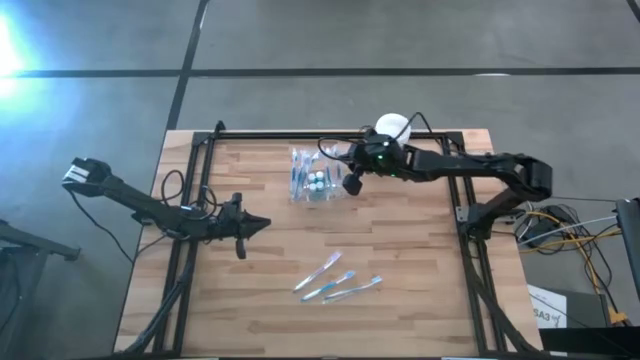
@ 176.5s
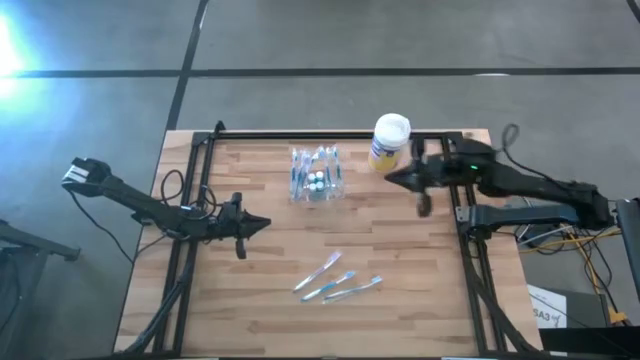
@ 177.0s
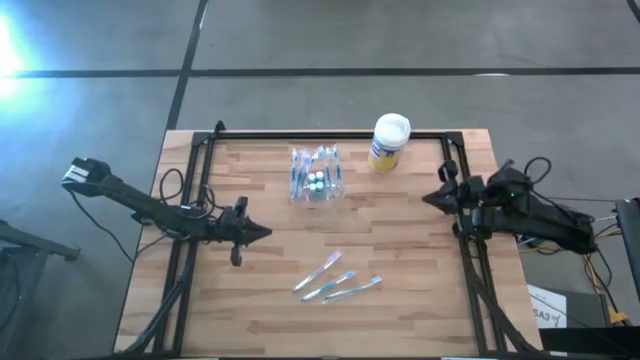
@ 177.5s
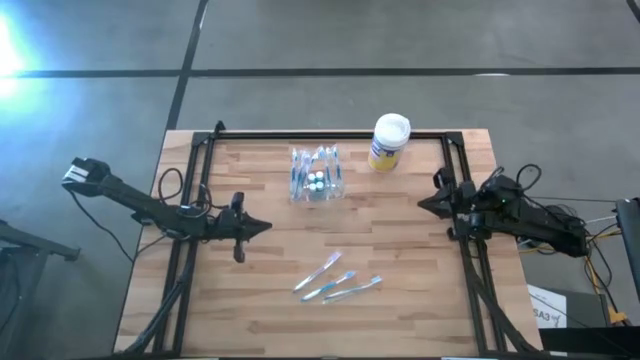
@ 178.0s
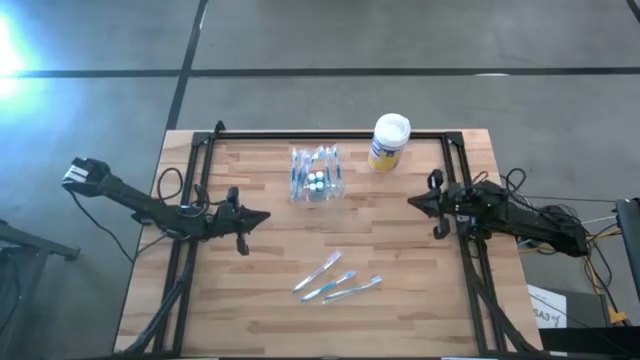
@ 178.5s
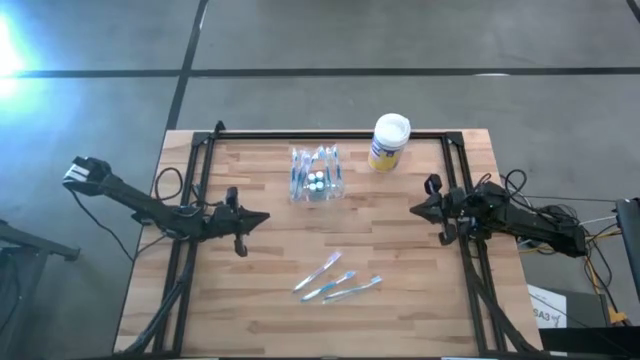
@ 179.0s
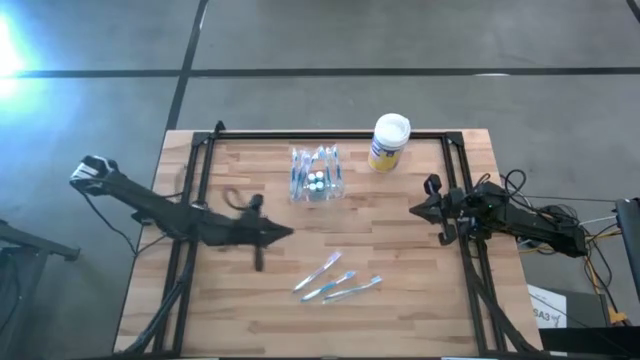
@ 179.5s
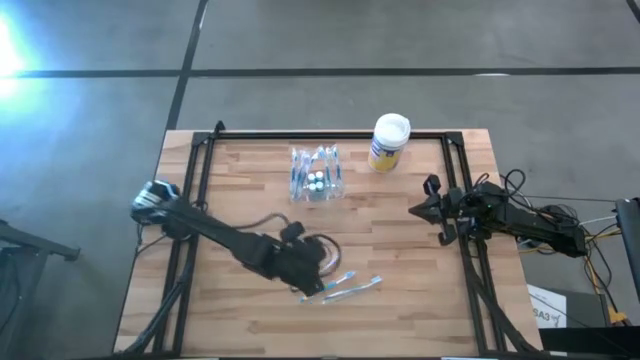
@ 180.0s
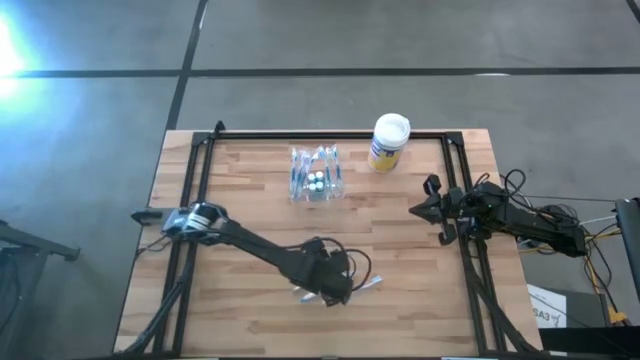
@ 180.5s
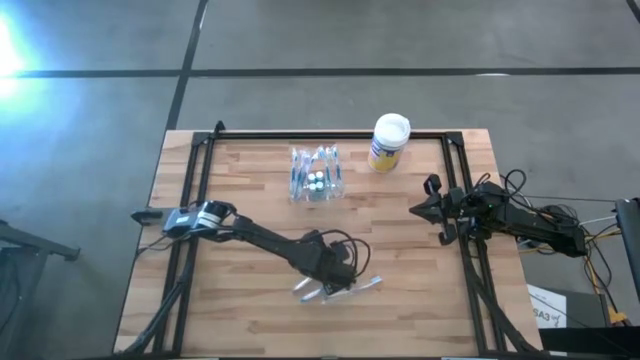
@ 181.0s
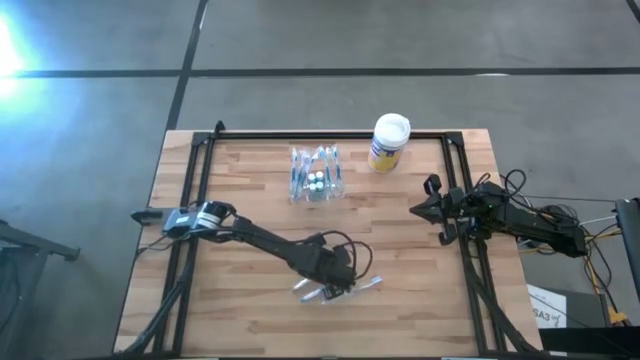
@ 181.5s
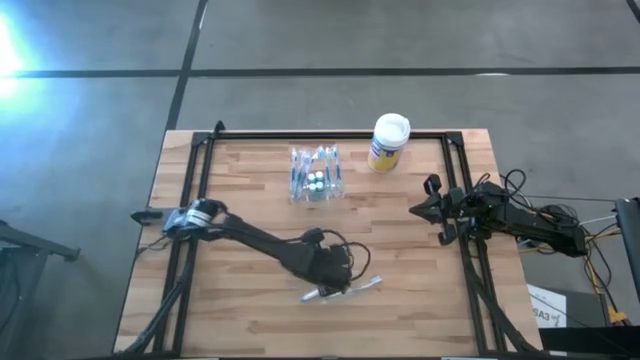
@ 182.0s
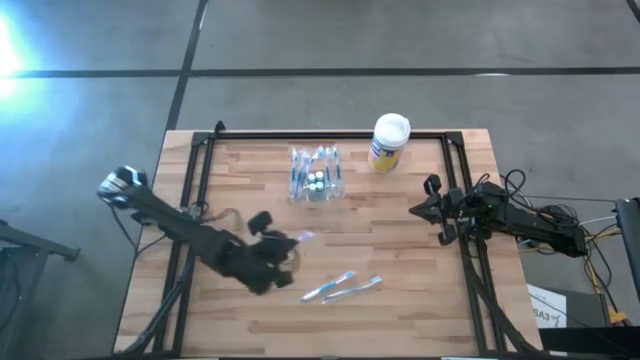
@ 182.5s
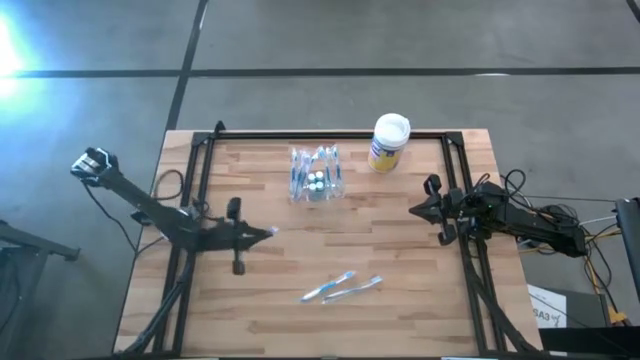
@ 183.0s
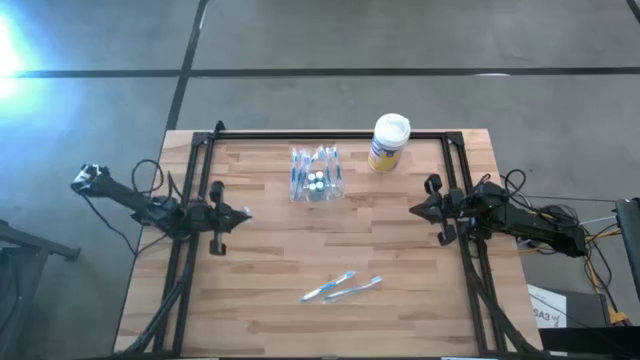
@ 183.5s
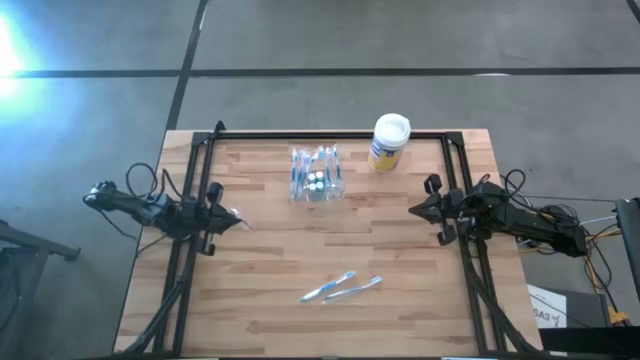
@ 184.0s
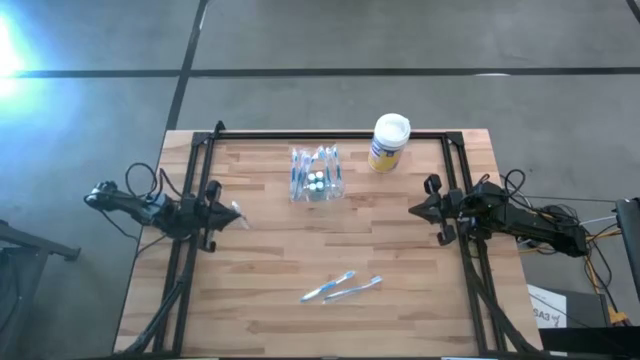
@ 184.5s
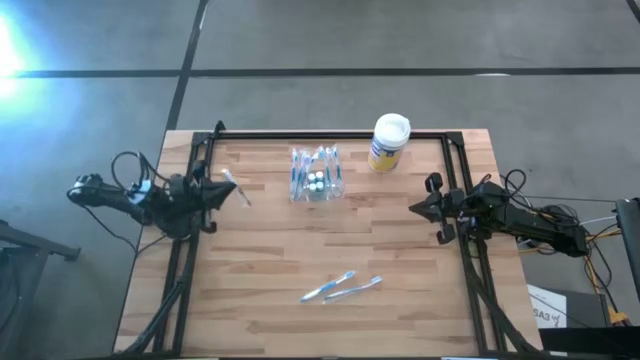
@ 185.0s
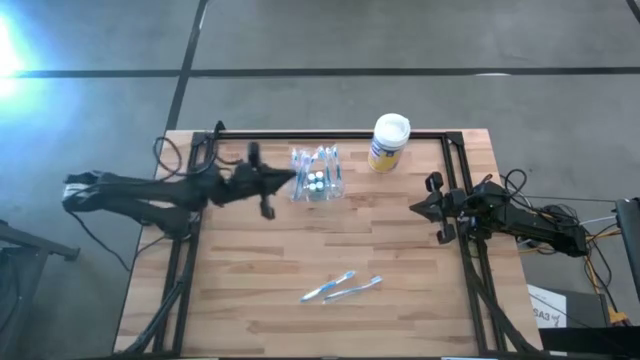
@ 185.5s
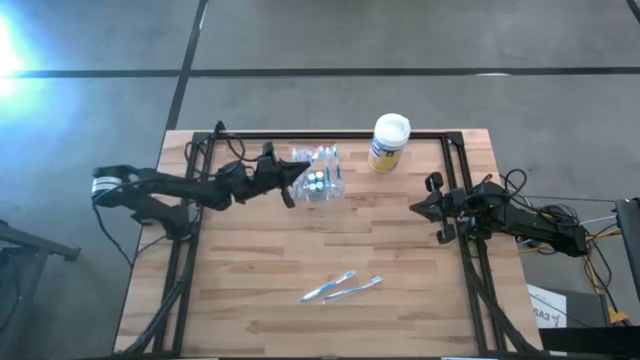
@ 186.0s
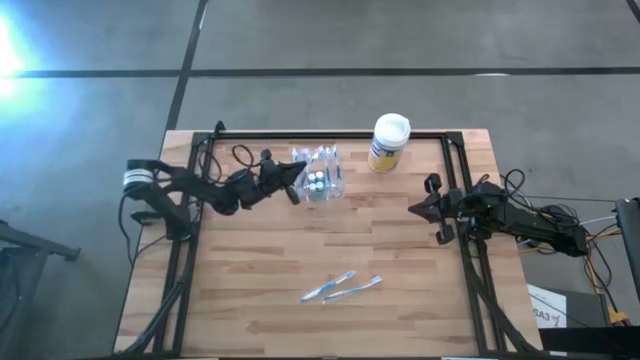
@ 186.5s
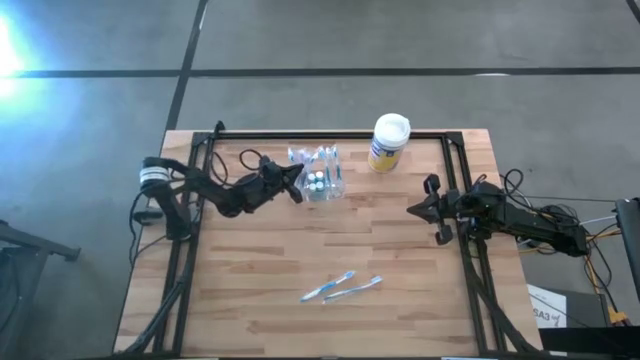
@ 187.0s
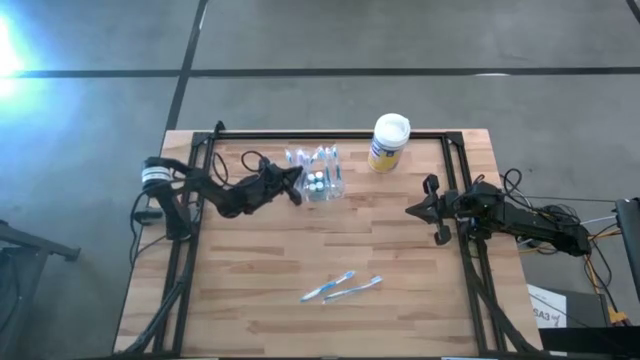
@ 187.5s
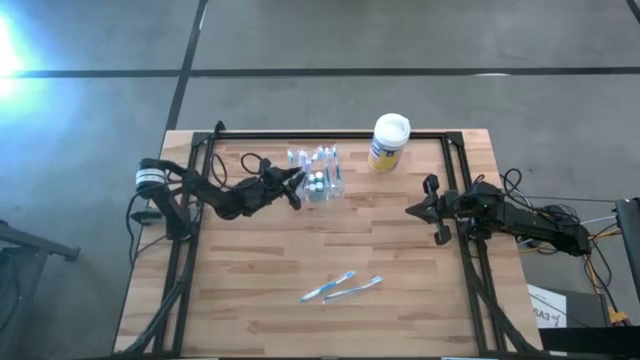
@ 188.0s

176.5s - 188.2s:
Task: Pick & Place toothbrushing station
Put the violet toothbrush into the transparent organizer

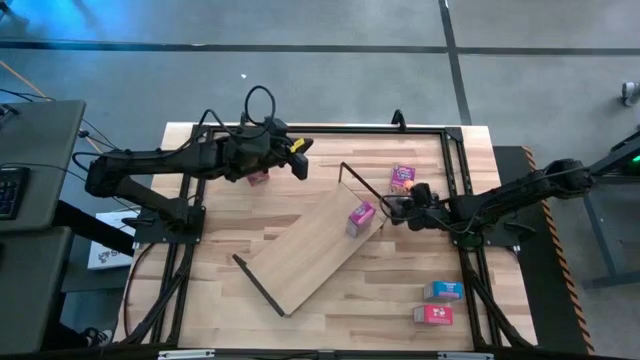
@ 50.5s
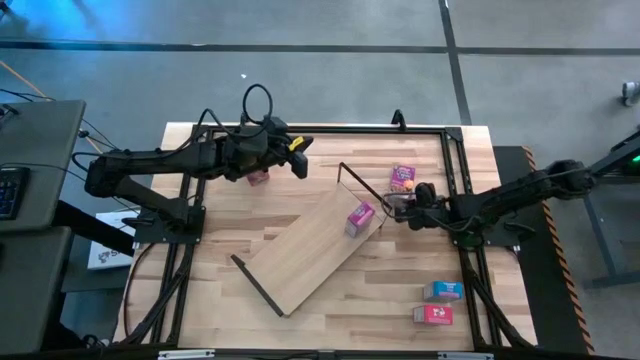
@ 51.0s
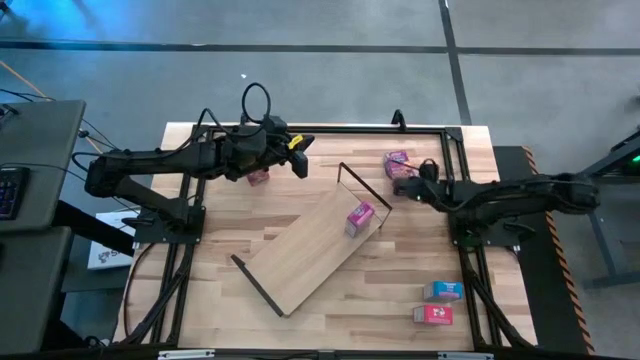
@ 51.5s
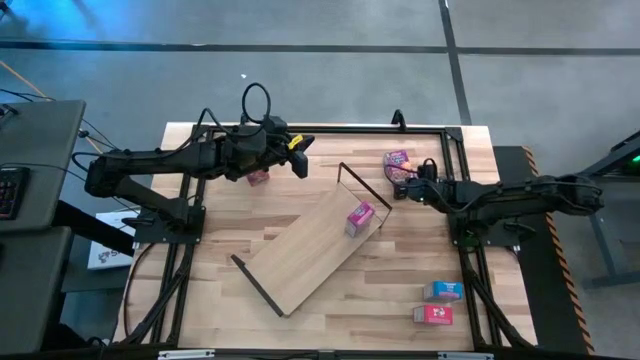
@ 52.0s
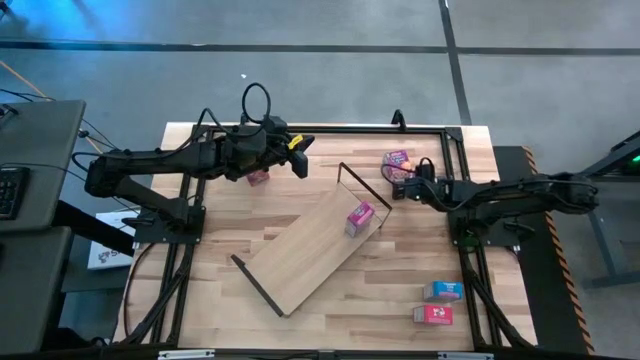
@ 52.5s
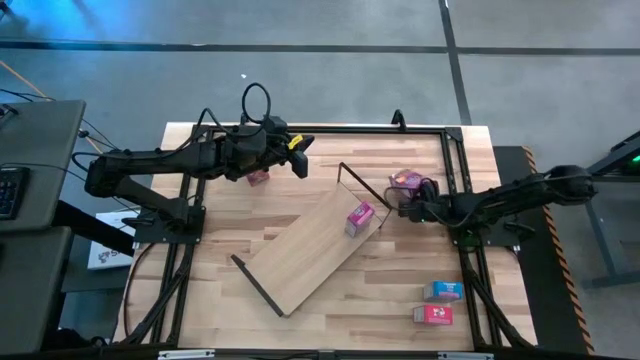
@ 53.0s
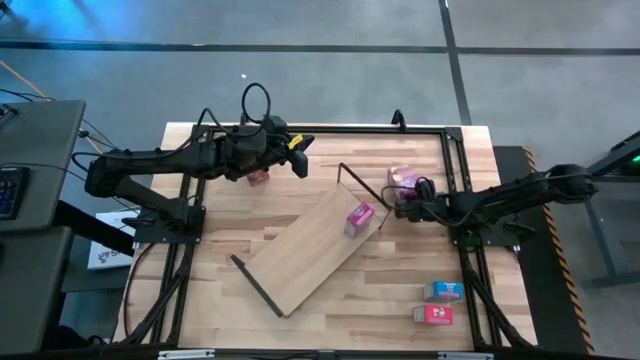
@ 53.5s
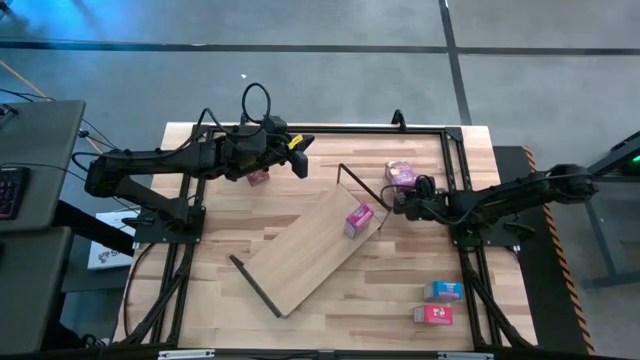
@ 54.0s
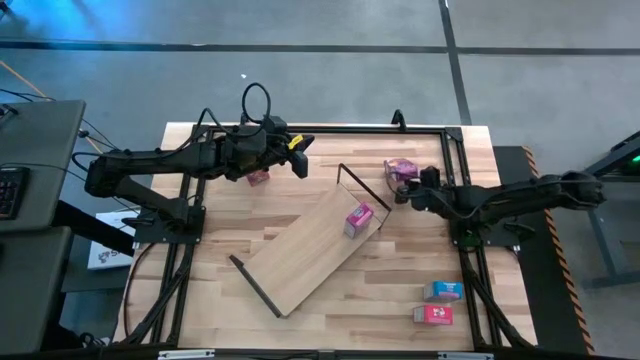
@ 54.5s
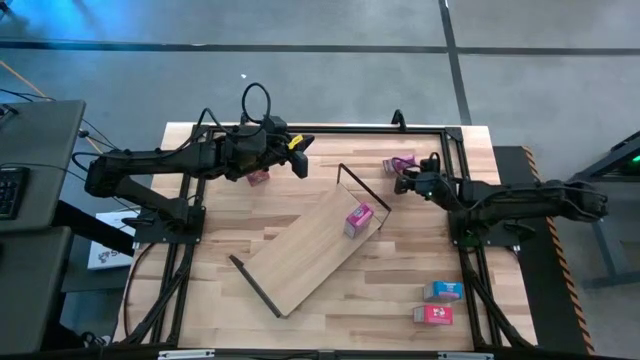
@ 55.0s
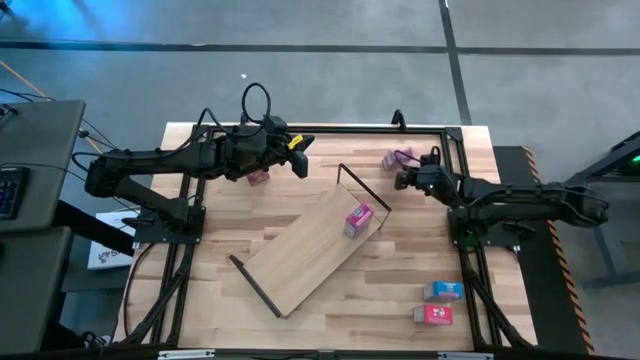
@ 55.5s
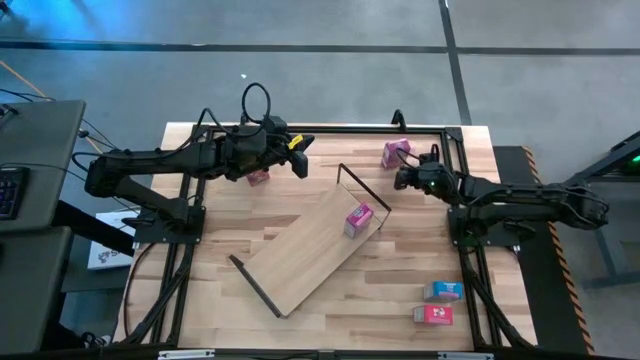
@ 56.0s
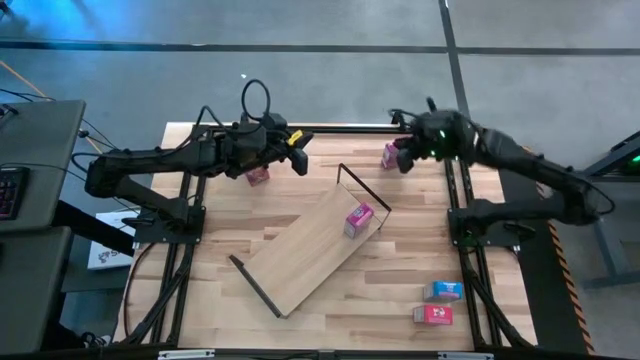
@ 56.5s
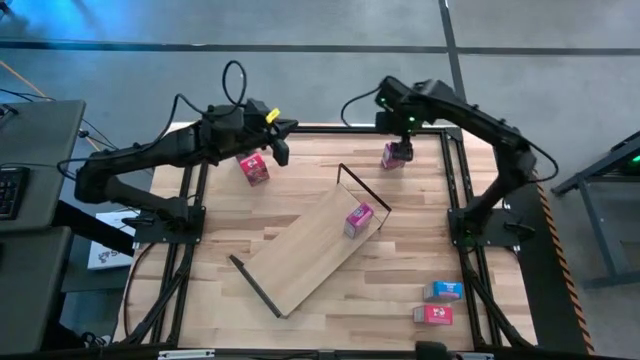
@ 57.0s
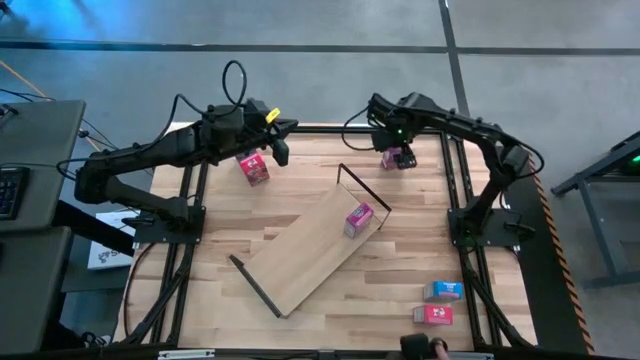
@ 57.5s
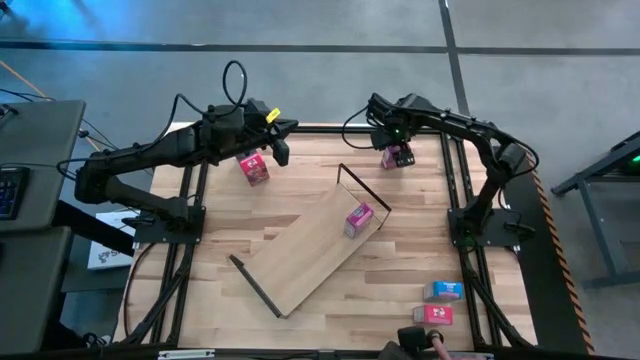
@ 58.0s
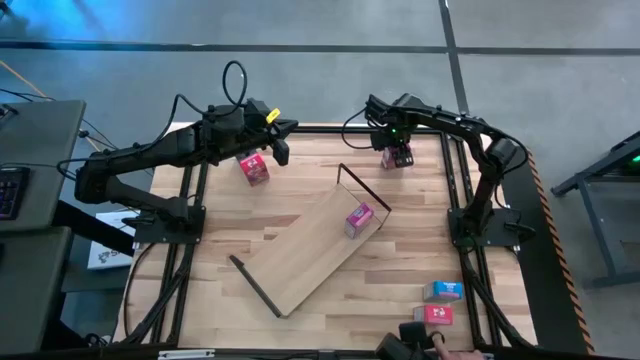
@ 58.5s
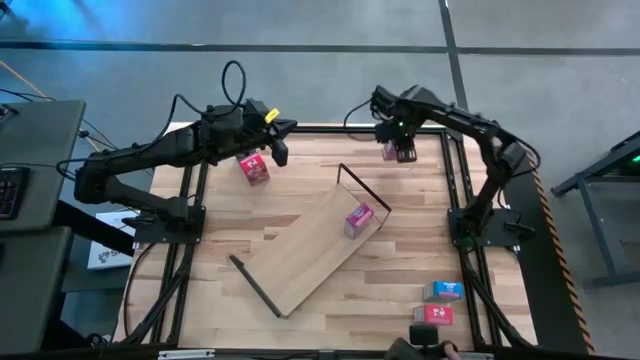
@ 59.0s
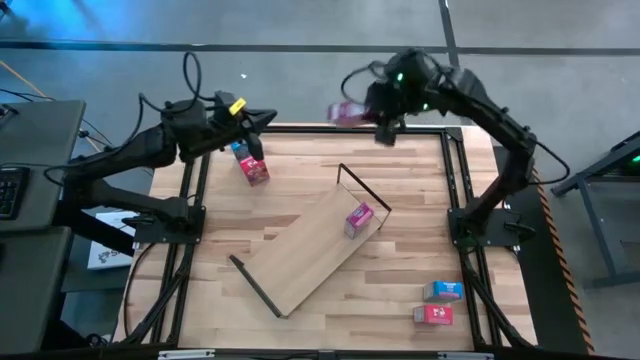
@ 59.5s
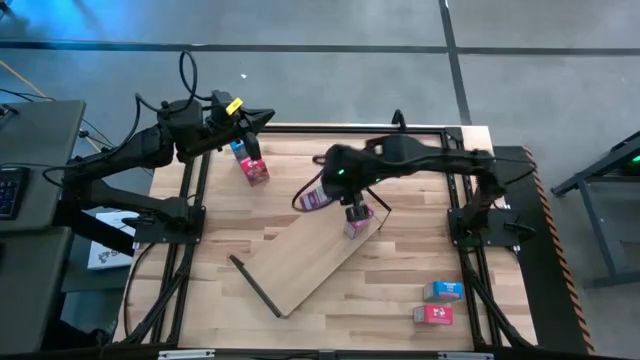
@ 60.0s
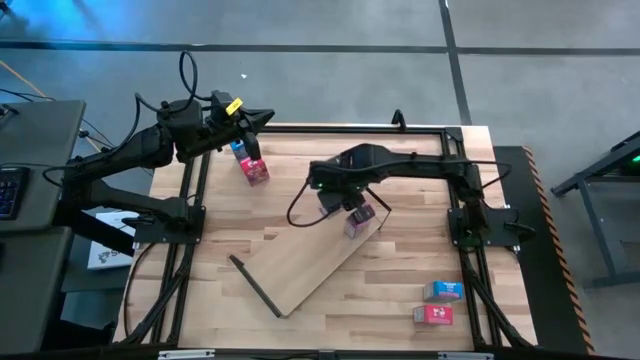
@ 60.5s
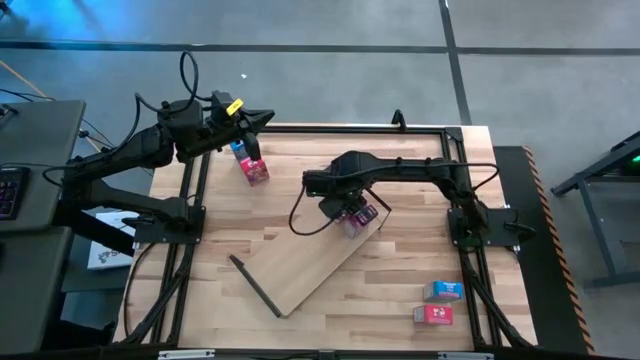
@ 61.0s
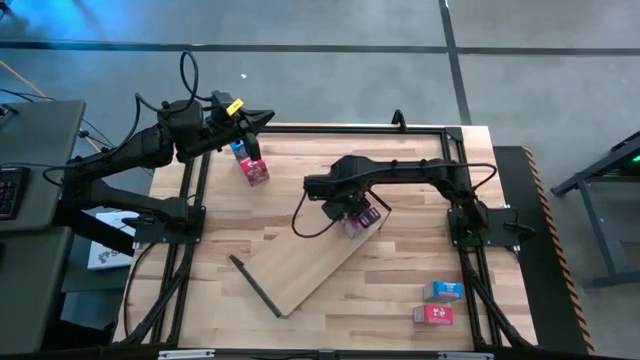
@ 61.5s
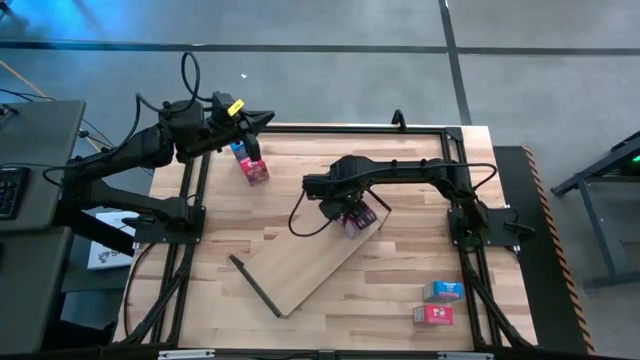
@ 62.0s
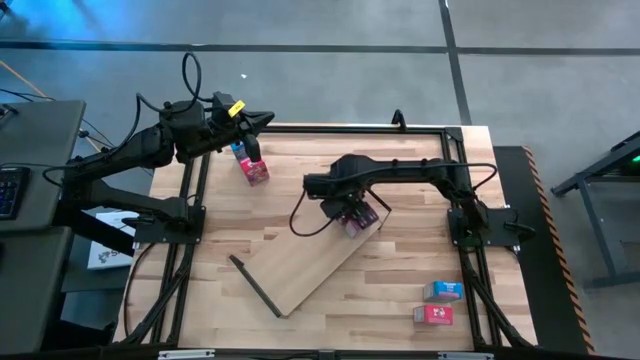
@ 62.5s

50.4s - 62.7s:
Task: Stack cereal on shelf
Put the purple cereal box on the shelf aligned with the other purple cereal box
